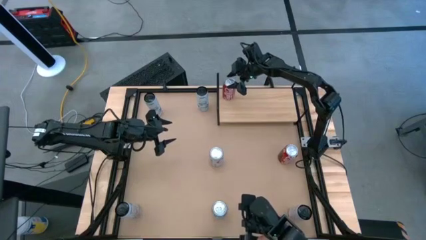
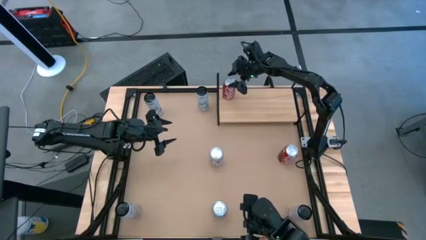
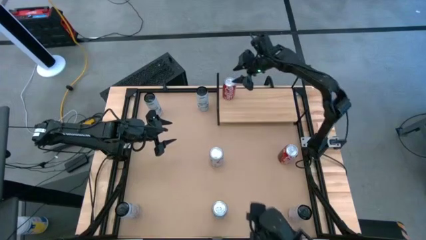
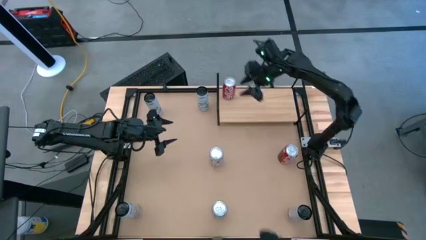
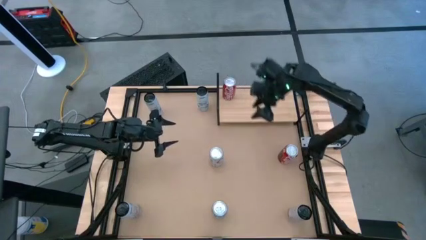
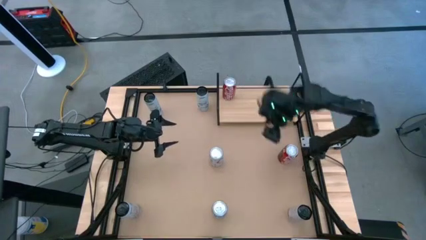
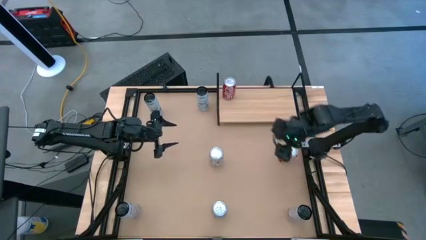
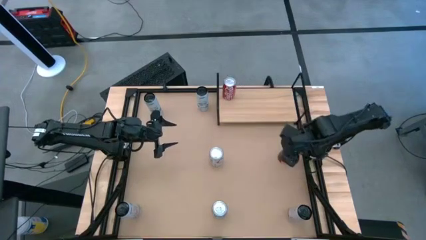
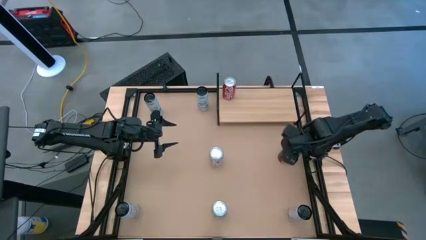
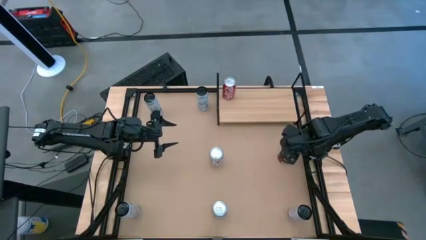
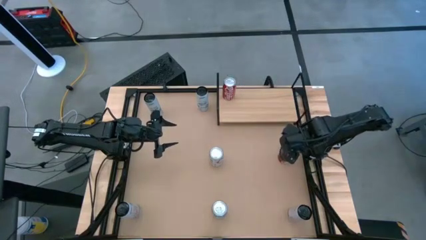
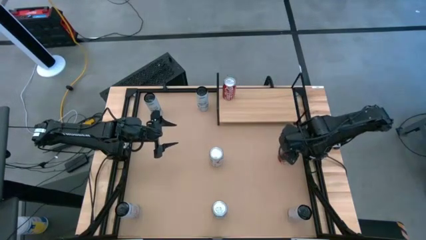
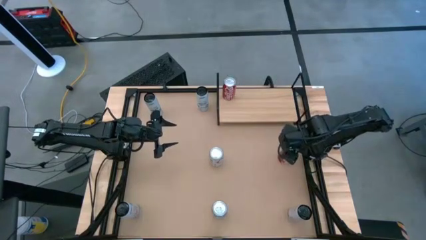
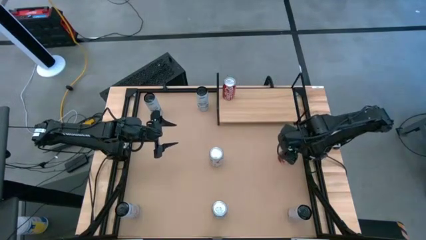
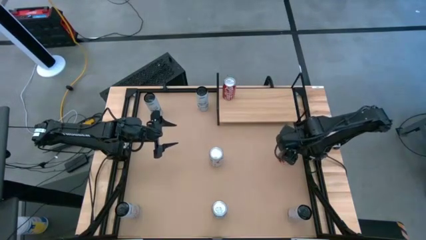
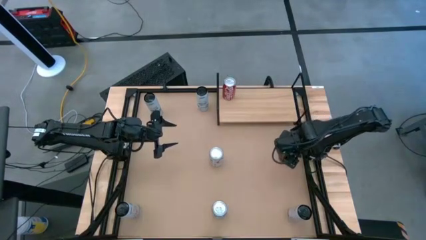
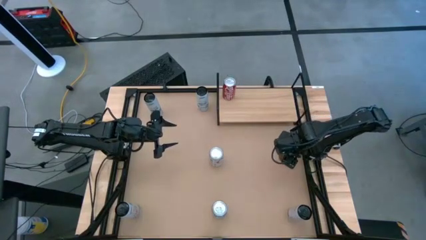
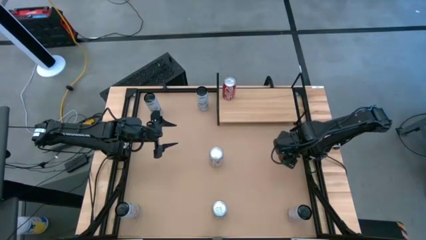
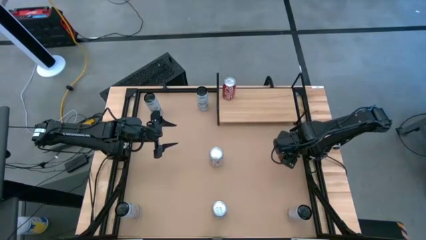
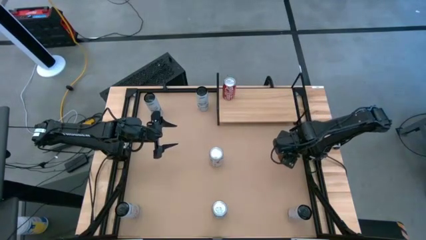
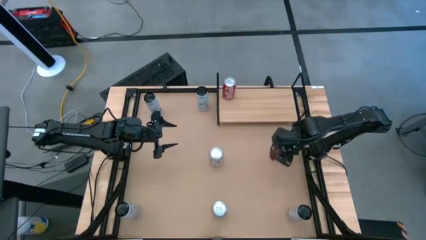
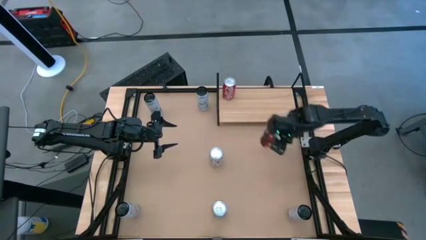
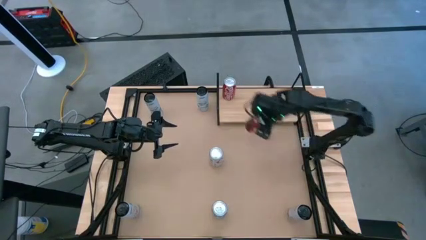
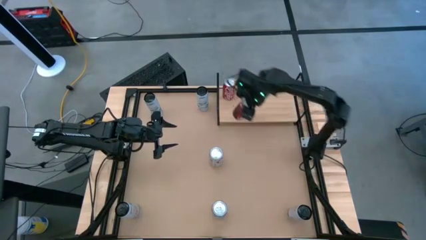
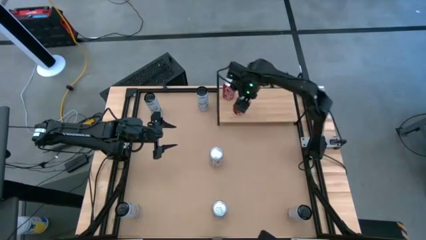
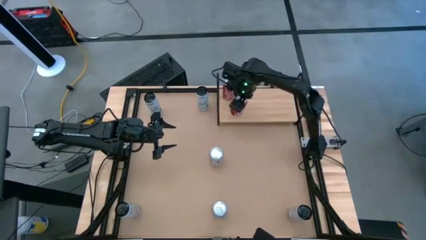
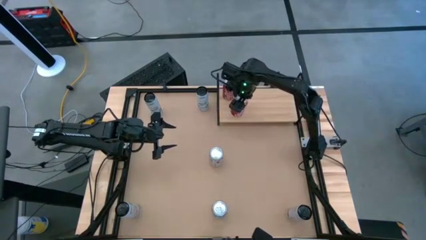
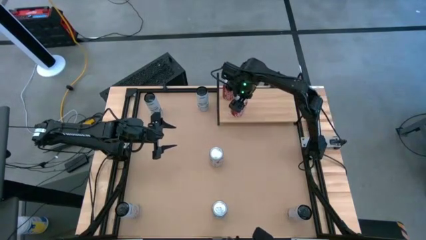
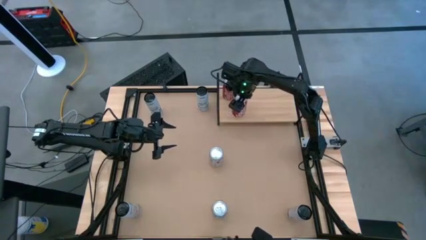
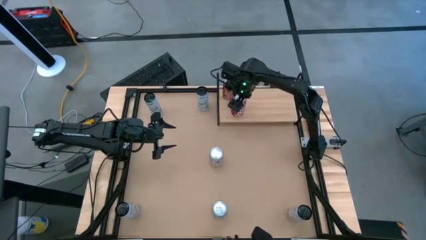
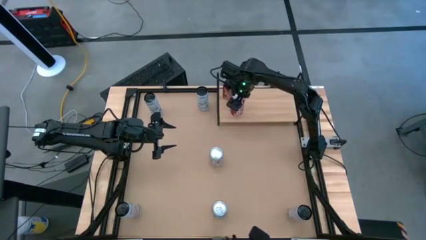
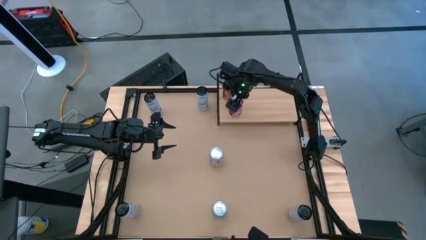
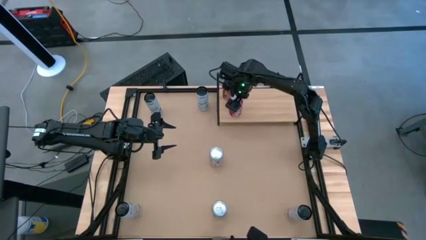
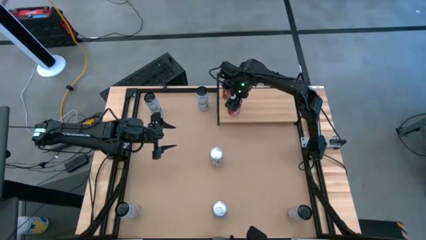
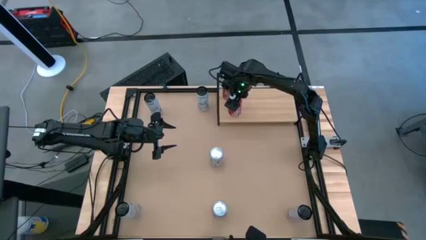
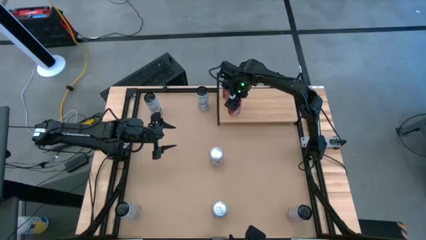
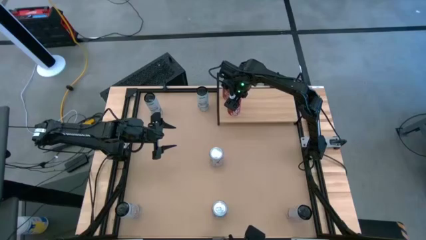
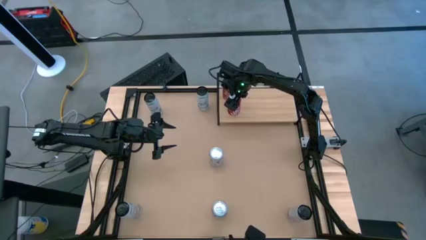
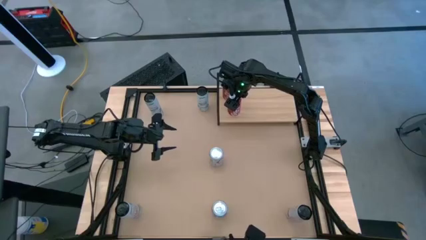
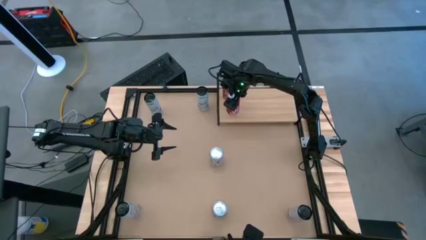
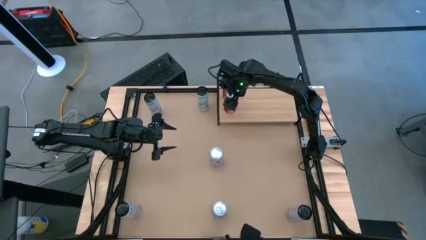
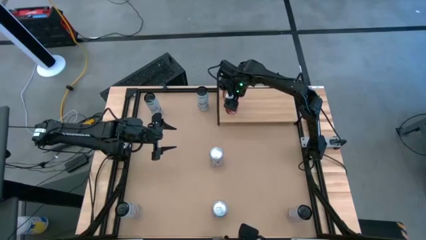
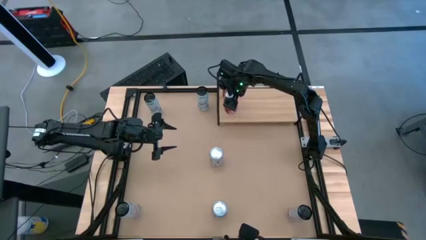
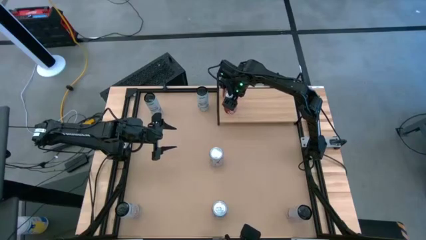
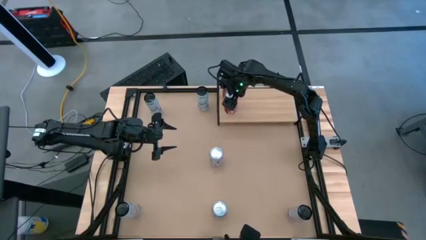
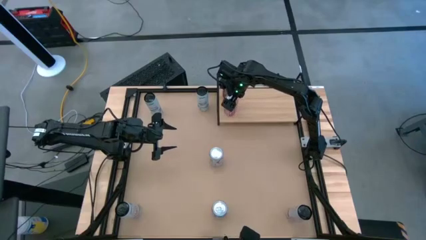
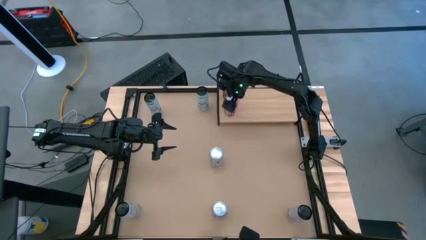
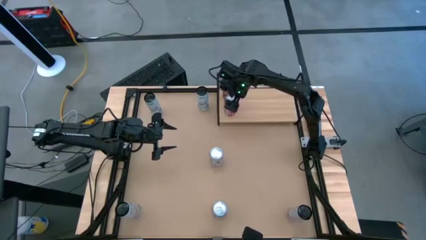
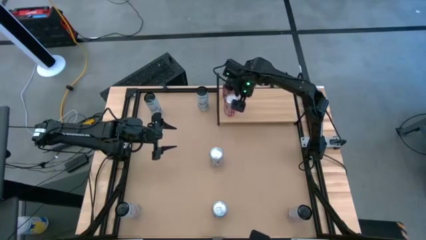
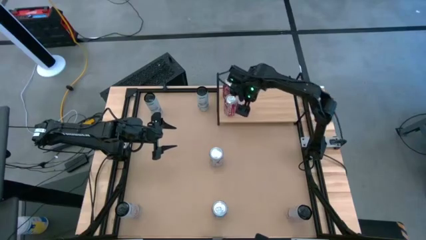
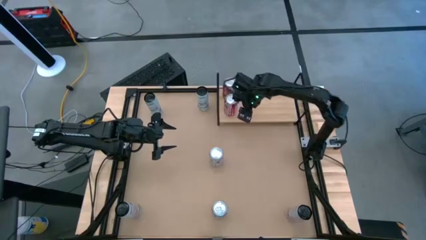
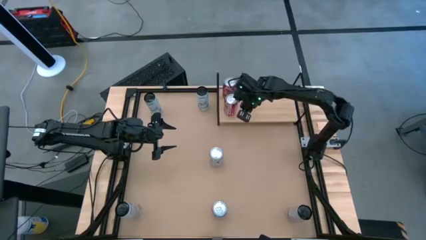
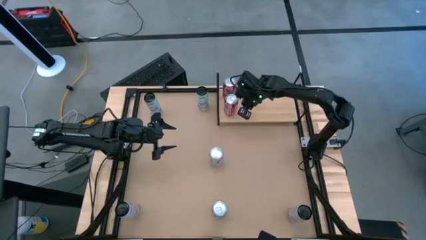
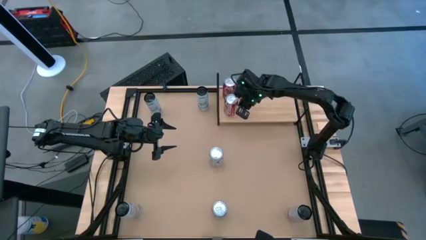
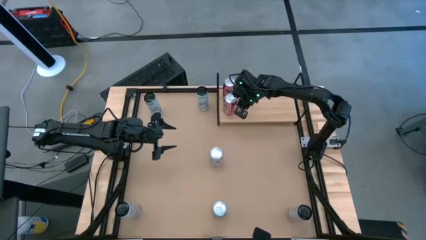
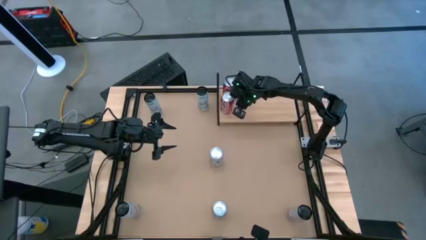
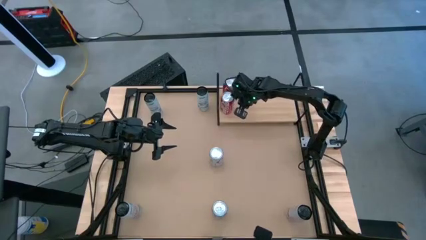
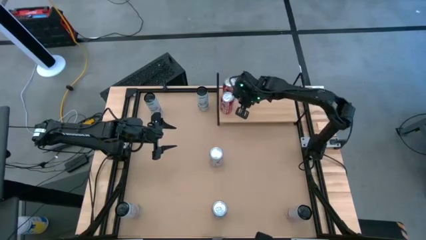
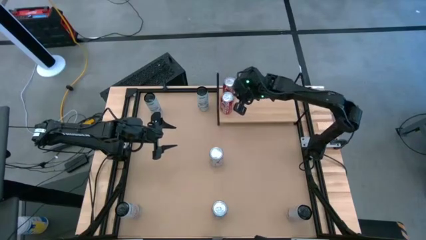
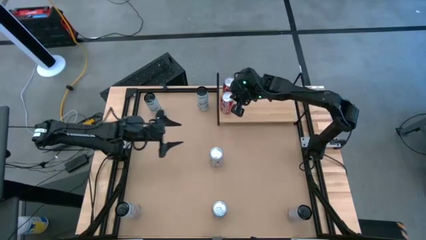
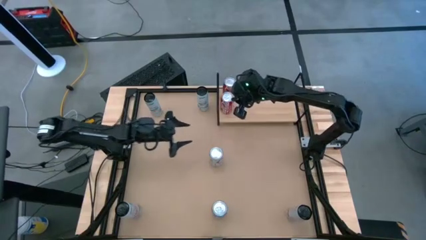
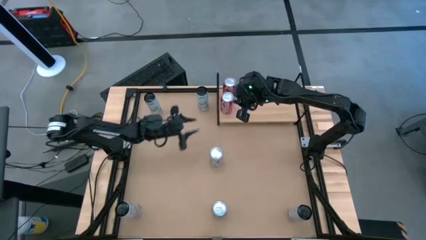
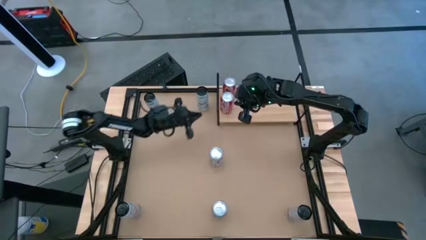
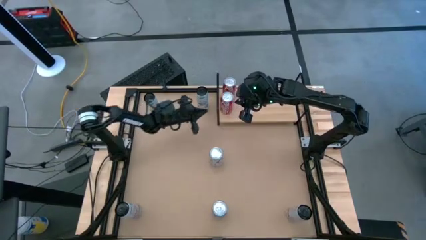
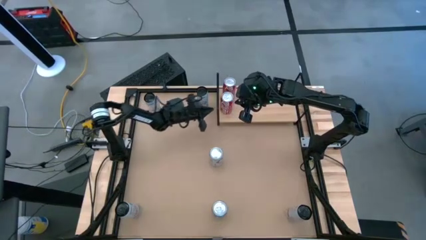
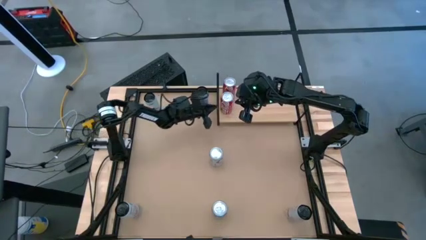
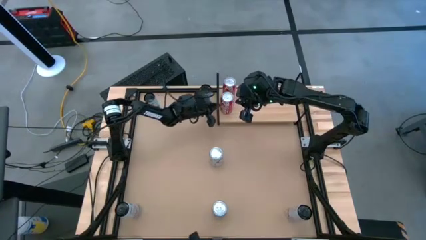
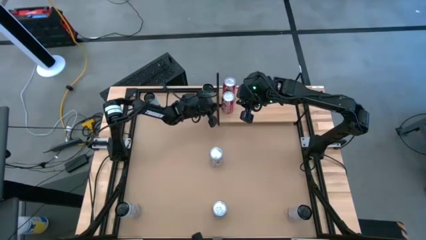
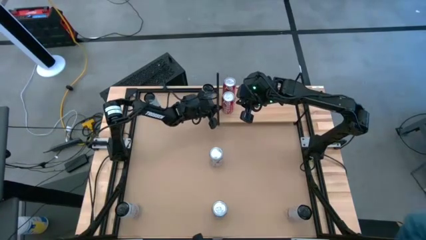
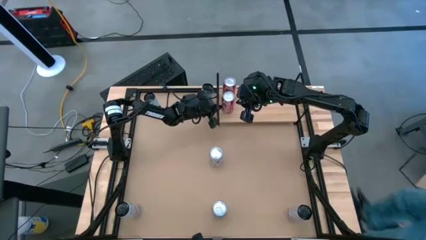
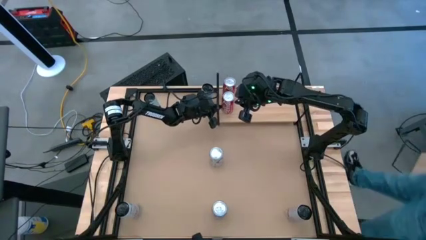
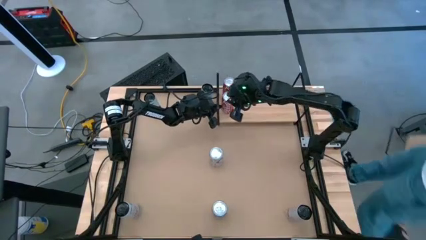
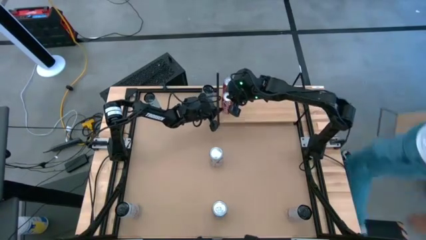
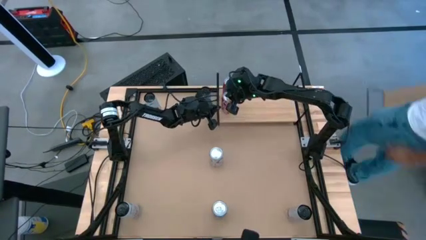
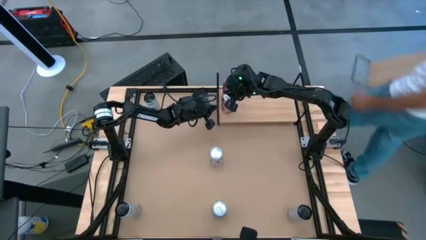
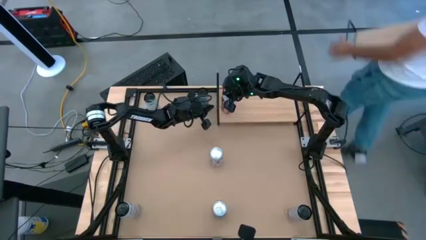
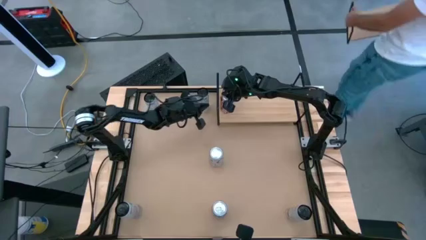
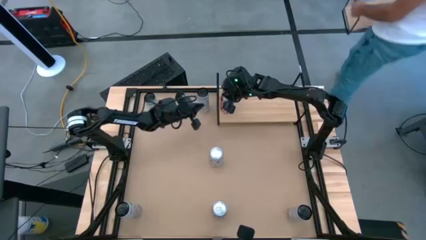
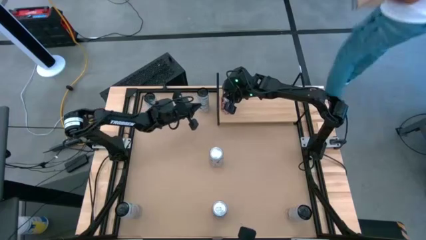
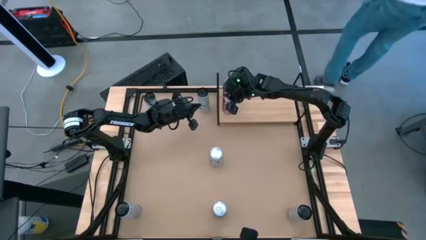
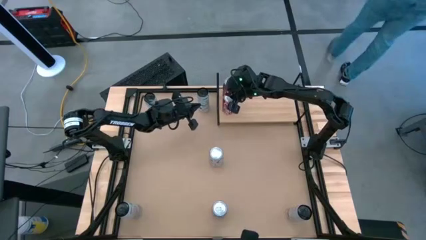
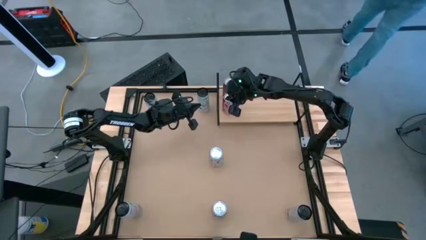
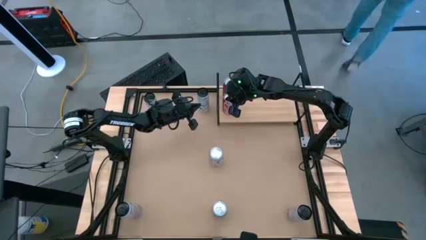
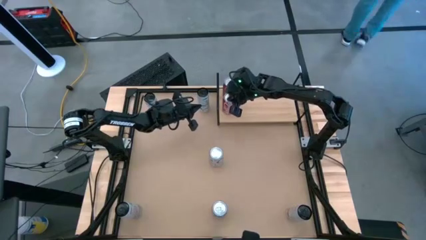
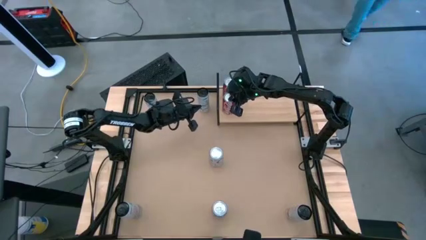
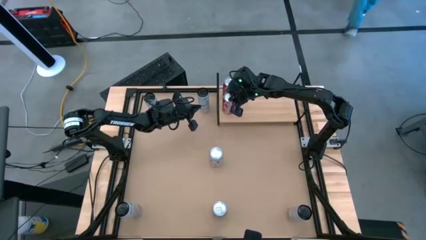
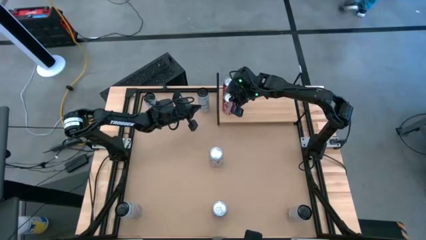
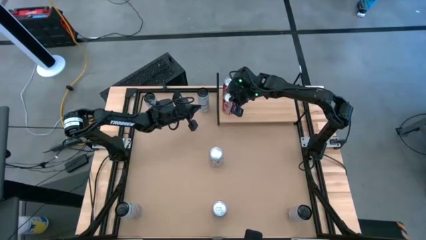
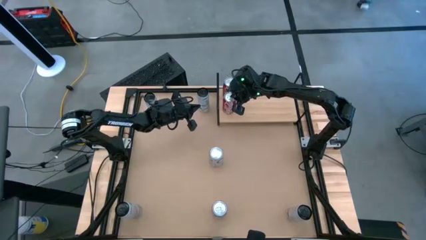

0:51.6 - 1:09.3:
Task: Place canned beverage on shelf
Put the red soda can on the shelf
